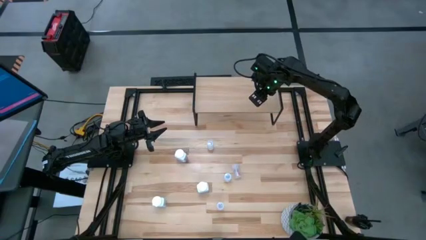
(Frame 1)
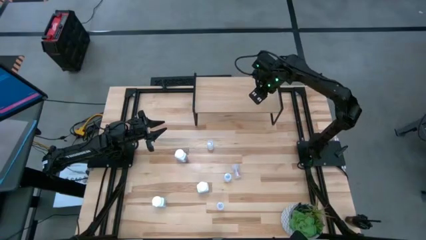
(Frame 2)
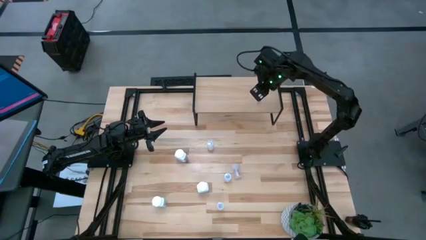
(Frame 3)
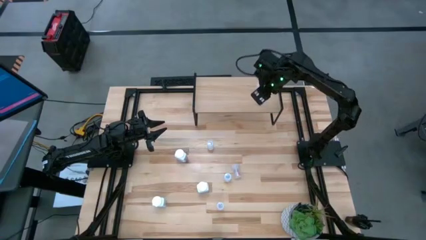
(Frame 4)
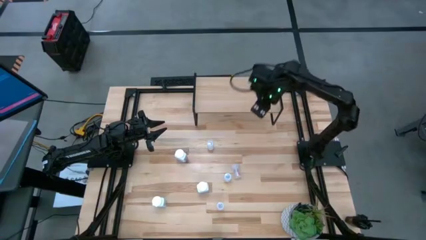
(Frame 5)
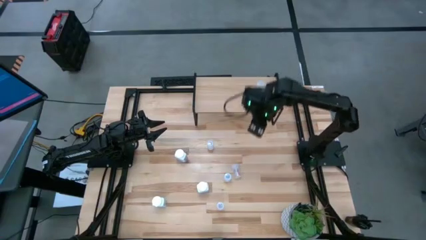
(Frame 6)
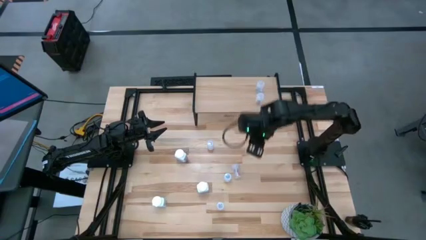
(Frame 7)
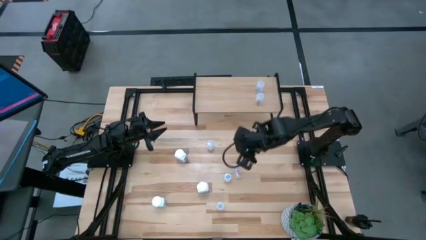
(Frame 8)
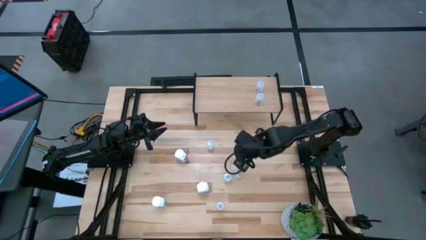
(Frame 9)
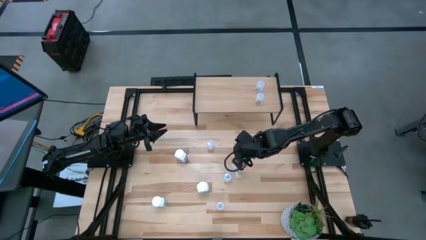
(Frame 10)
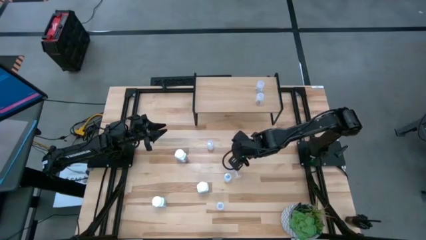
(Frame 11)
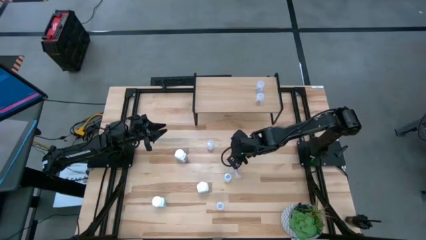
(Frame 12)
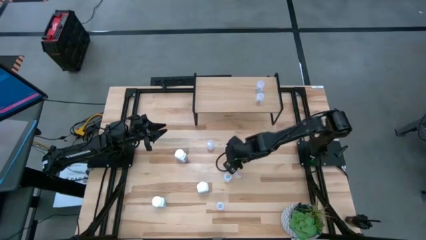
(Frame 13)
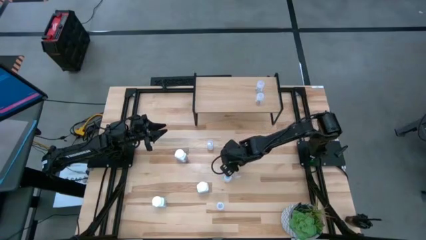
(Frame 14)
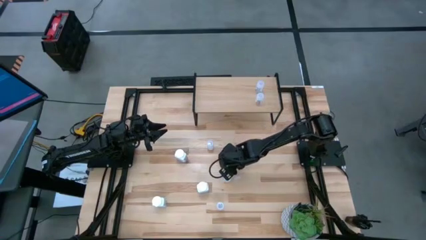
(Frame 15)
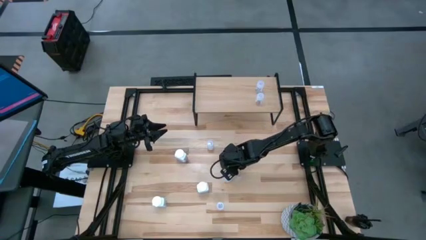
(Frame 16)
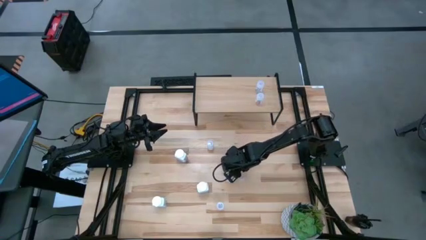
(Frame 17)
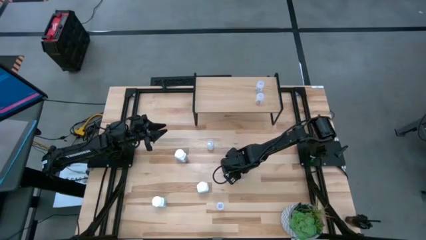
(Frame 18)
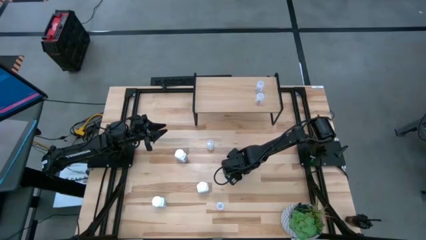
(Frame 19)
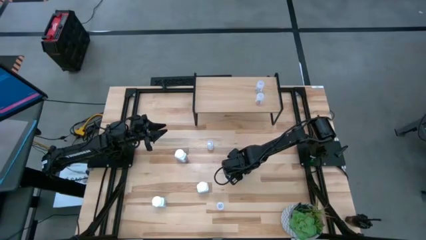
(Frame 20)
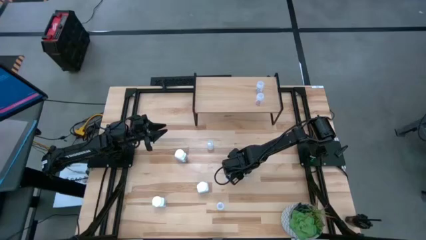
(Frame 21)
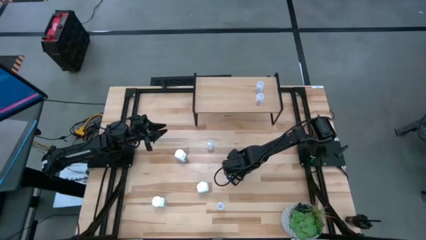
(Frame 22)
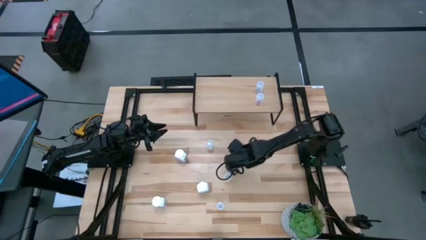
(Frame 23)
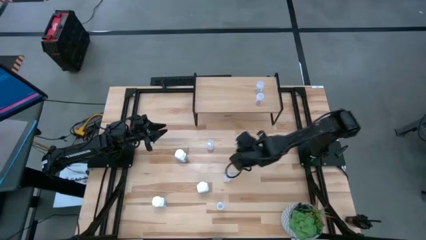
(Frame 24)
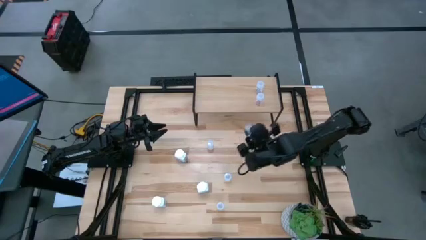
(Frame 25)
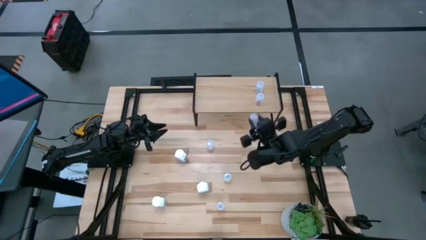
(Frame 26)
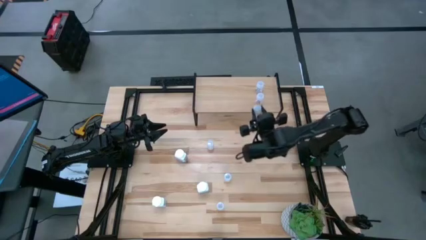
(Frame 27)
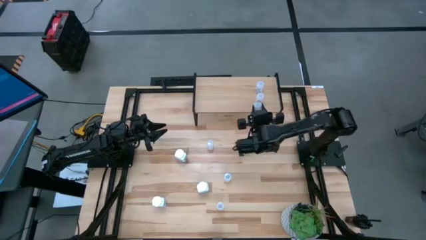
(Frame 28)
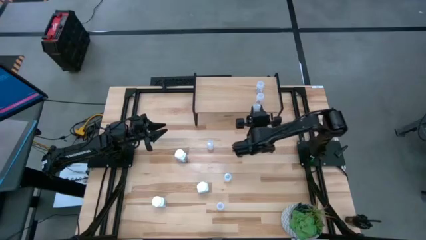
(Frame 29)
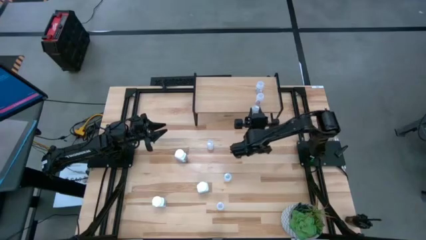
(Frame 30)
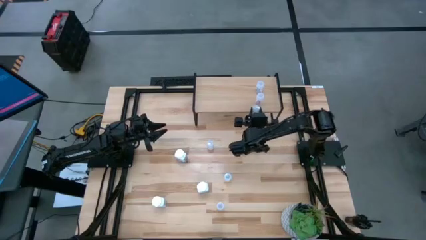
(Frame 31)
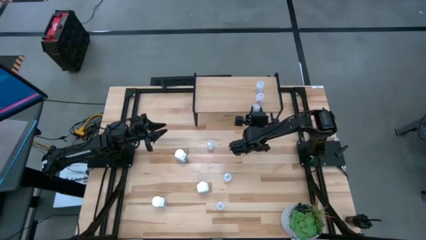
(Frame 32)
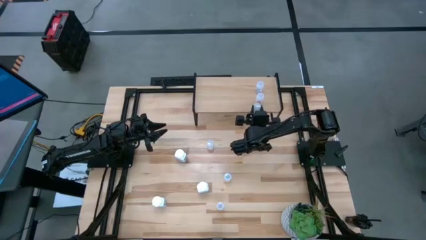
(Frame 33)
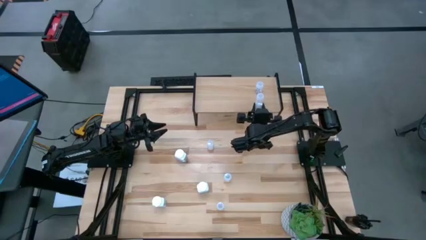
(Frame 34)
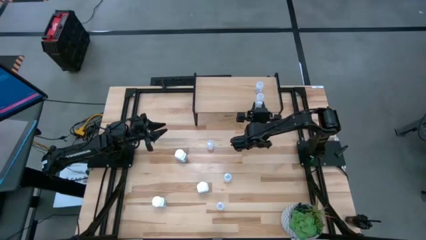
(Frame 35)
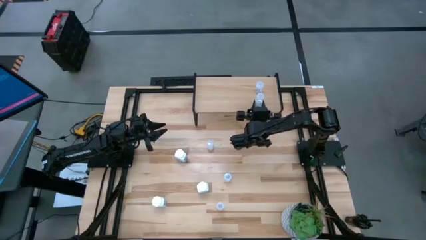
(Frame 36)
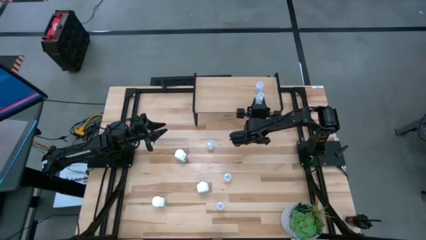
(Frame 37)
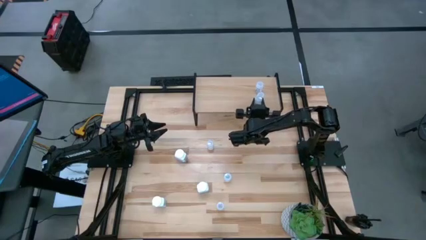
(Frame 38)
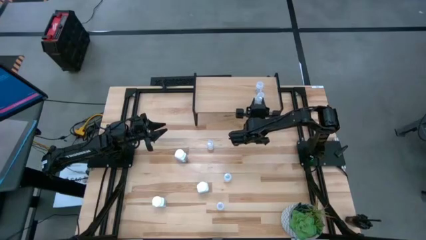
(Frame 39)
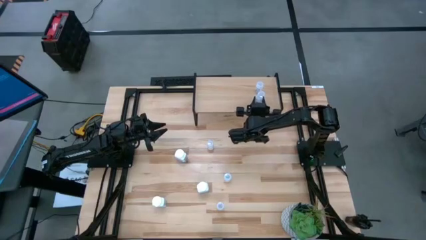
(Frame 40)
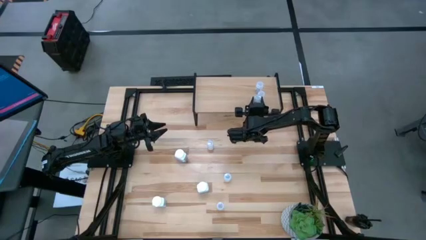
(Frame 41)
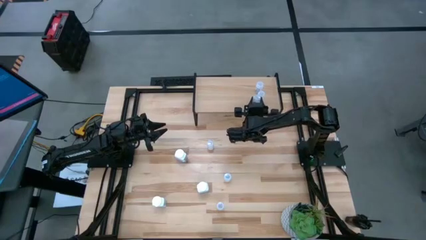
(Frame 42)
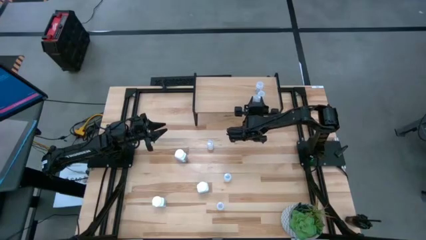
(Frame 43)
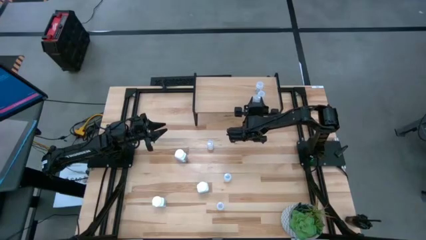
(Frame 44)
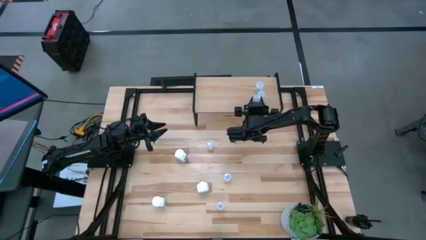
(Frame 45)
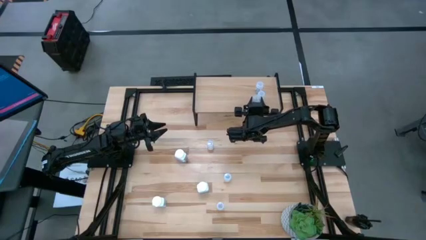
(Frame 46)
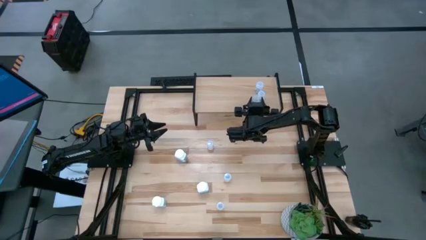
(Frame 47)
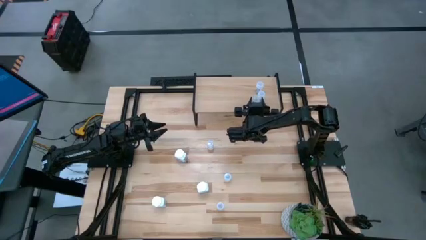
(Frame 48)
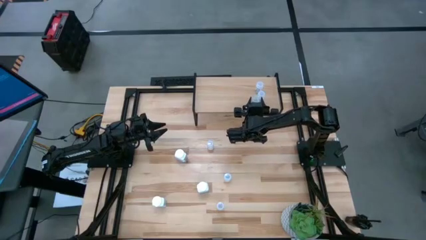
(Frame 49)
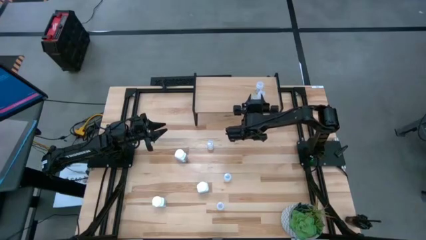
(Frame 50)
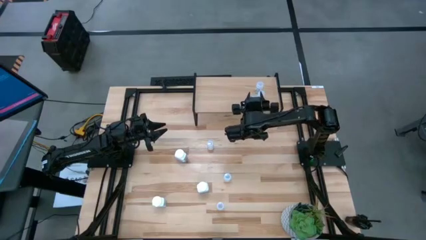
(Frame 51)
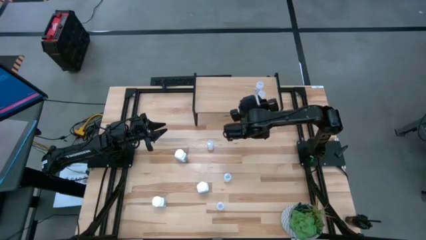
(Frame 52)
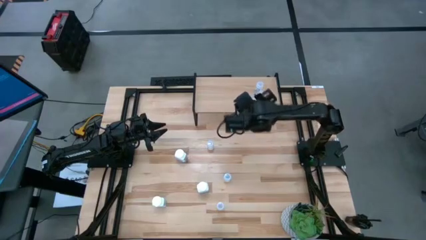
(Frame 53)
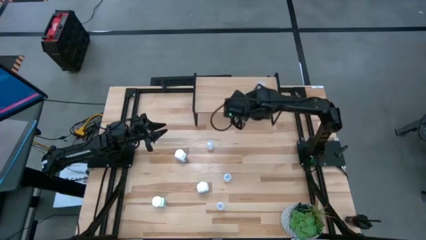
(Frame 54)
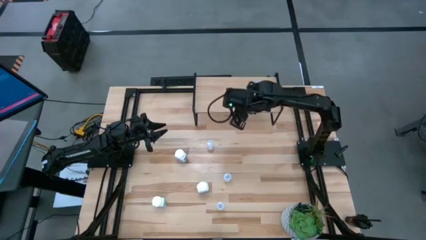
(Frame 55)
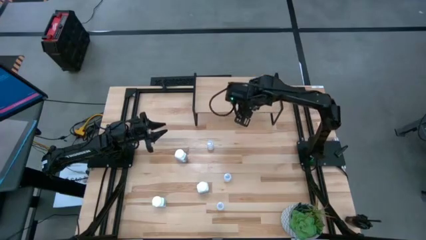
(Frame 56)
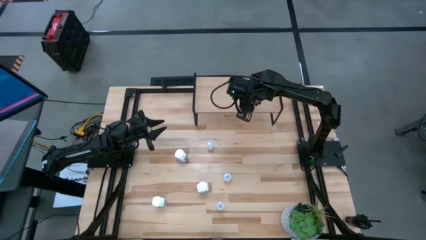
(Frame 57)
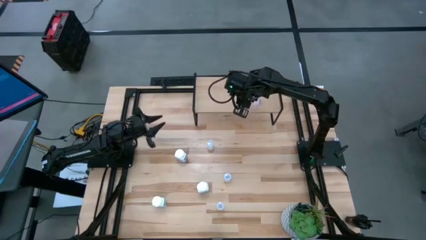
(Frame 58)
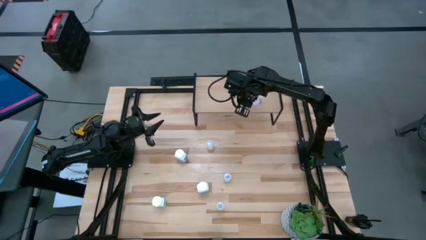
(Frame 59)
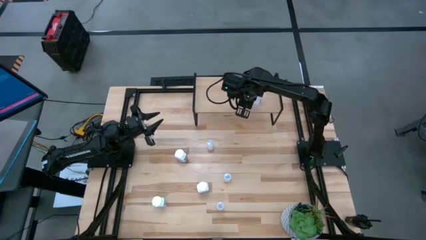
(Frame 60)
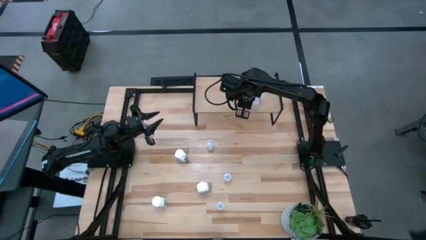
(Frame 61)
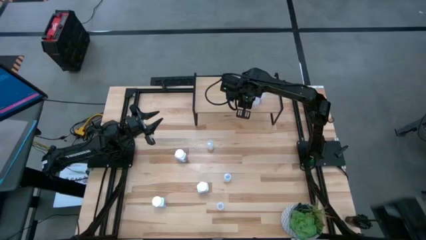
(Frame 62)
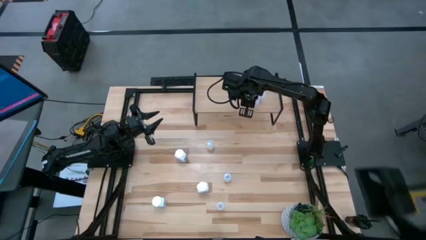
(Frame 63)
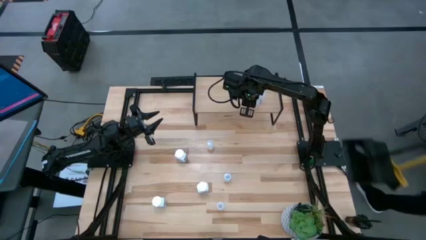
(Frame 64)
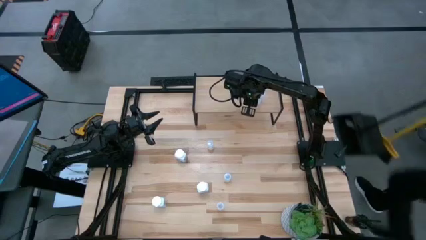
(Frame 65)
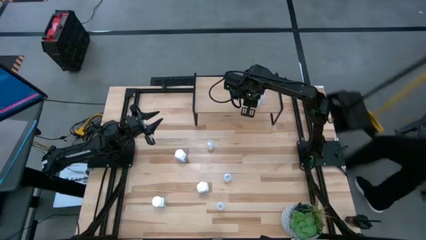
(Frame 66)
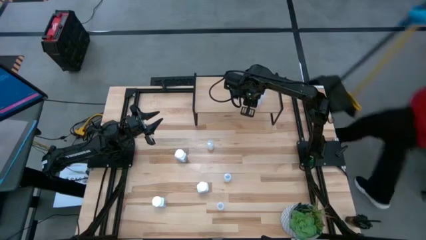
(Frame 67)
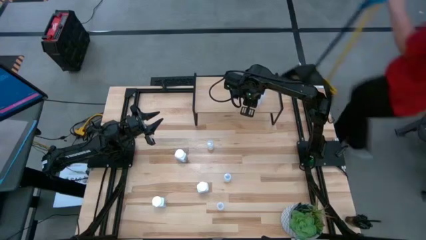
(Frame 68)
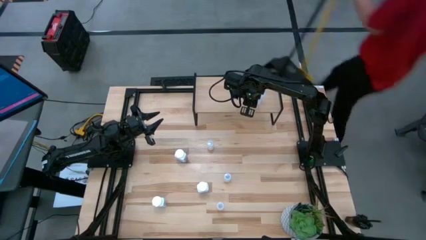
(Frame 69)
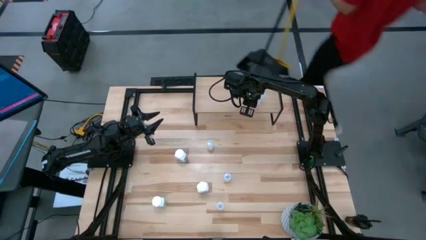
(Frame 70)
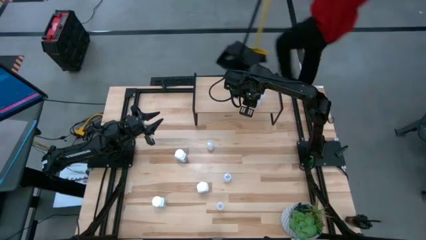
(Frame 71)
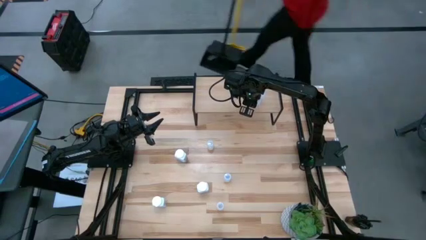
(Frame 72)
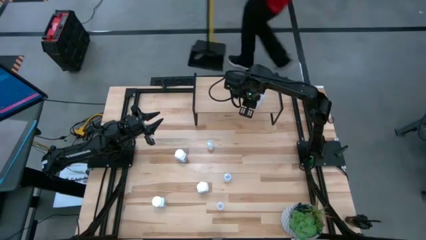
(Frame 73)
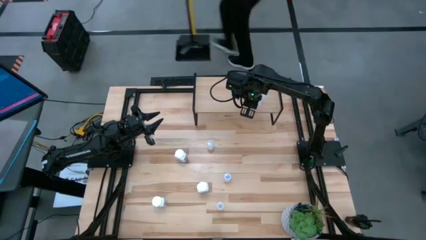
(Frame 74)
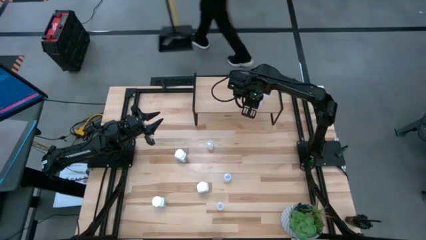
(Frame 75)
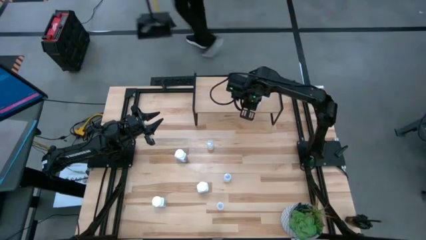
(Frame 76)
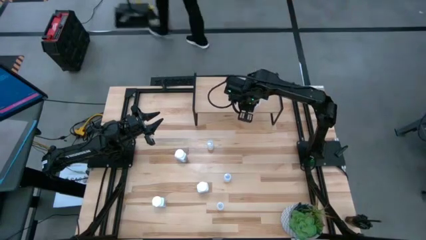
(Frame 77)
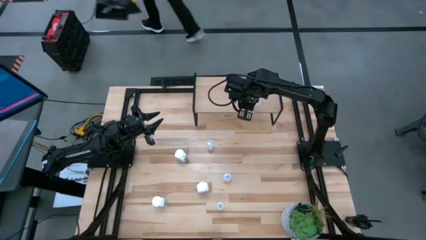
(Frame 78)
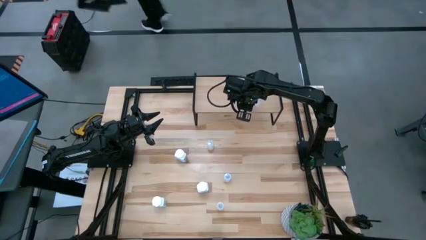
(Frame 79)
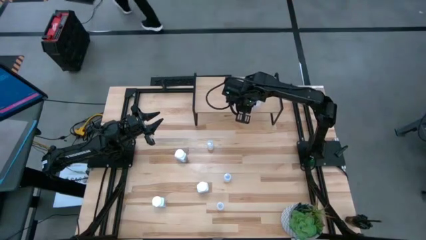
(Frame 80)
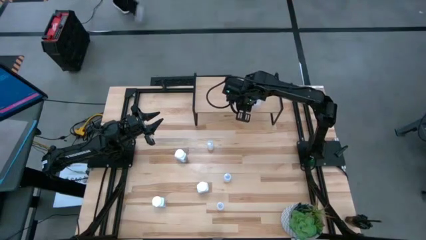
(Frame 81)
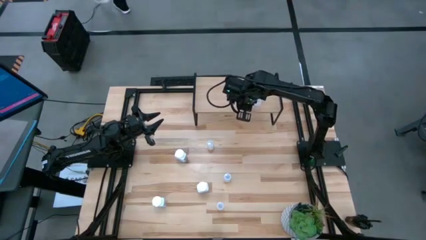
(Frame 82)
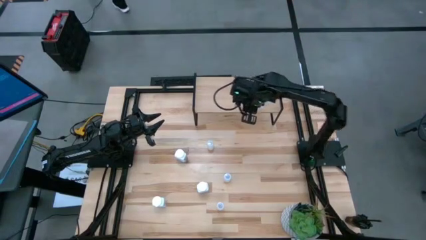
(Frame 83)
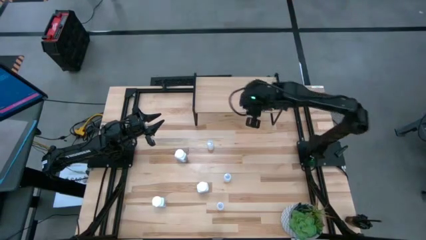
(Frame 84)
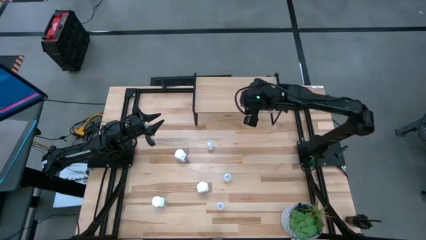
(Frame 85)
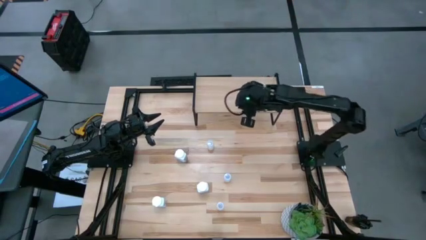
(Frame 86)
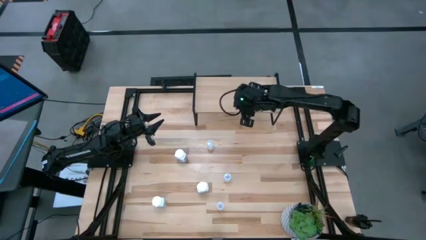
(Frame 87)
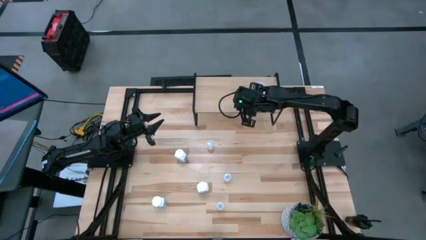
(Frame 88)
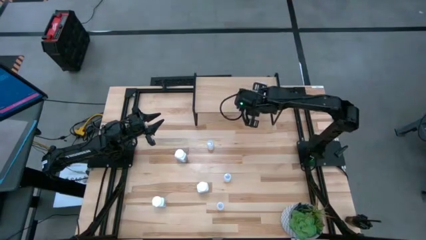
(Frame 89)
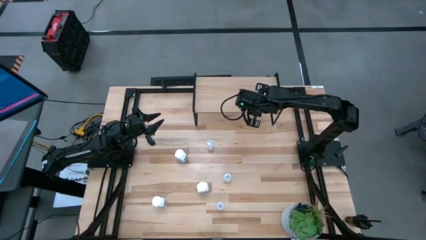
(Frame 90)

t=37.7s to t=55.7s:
Task: Pick and place medicine bottles onto shelf by color
Put the transparent pill bottle on the shelf aligned with the other transparent pill bottles
